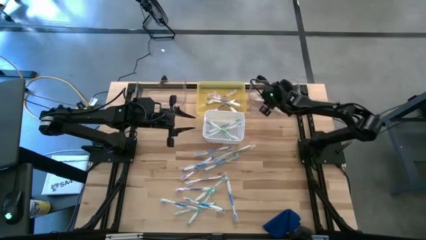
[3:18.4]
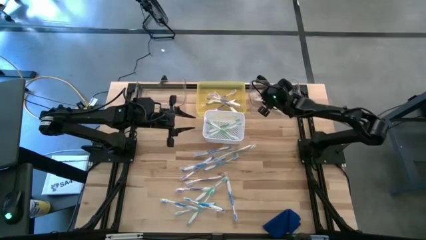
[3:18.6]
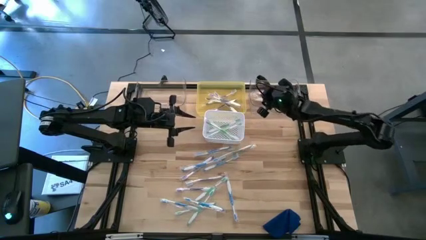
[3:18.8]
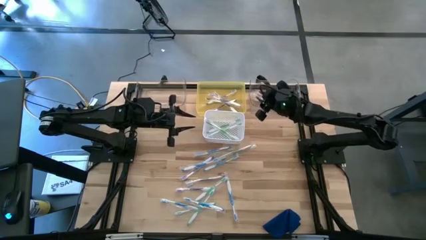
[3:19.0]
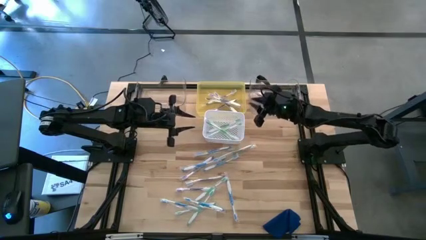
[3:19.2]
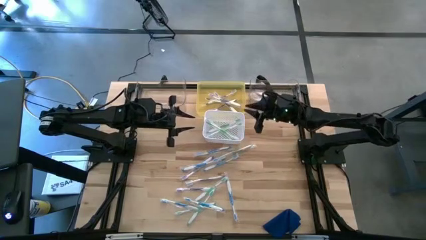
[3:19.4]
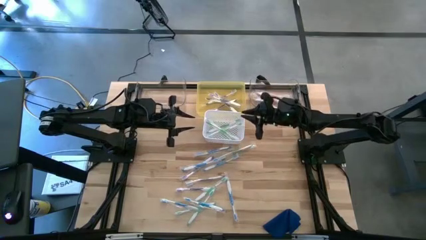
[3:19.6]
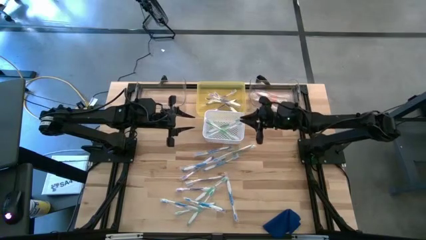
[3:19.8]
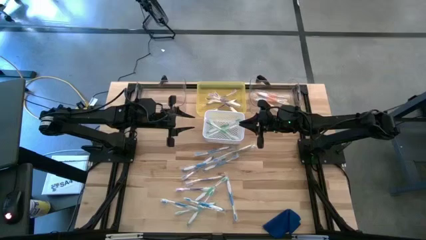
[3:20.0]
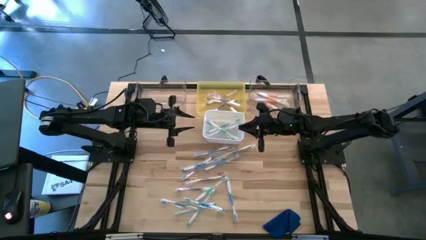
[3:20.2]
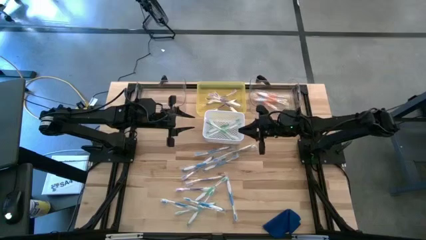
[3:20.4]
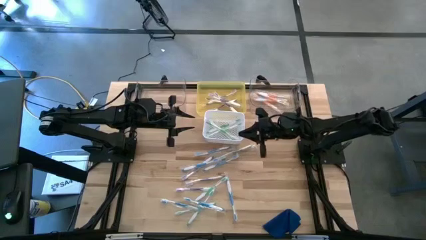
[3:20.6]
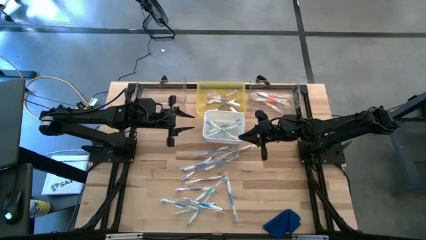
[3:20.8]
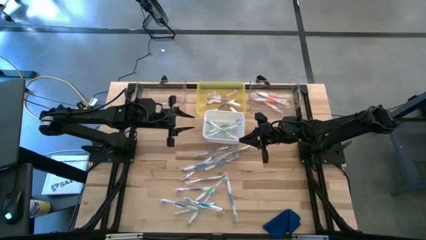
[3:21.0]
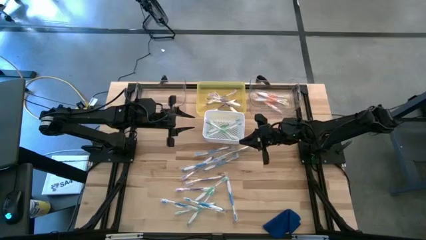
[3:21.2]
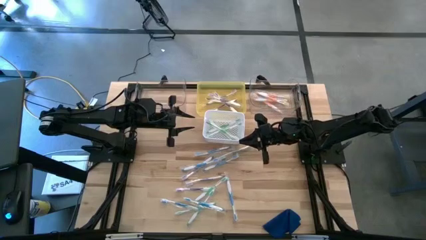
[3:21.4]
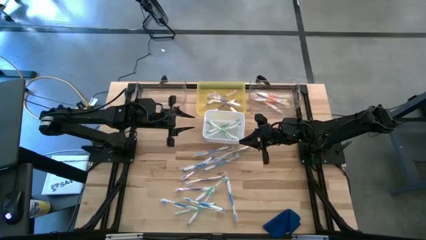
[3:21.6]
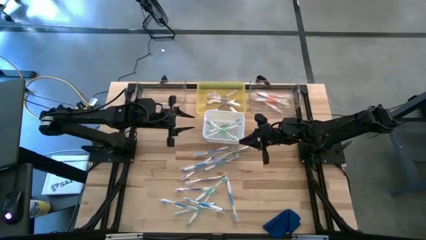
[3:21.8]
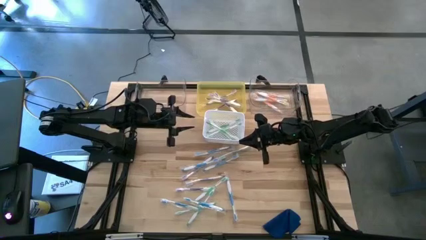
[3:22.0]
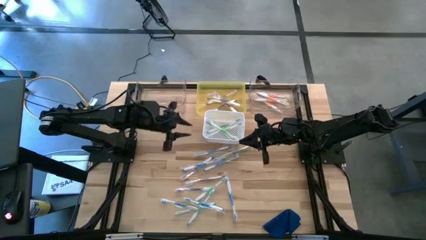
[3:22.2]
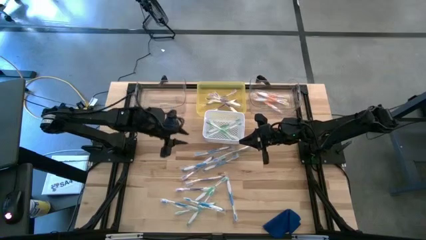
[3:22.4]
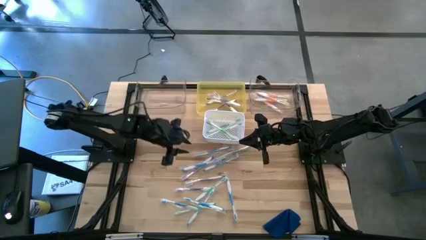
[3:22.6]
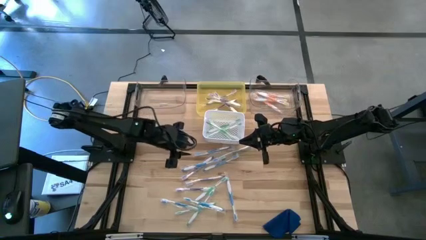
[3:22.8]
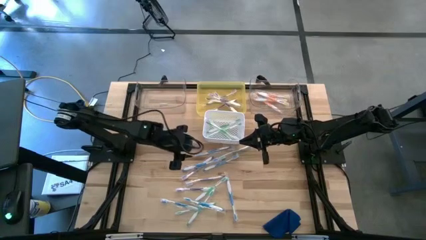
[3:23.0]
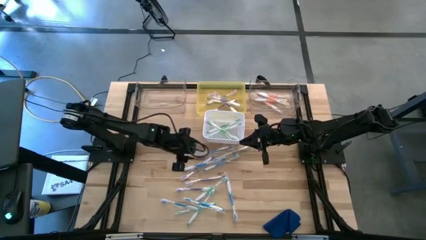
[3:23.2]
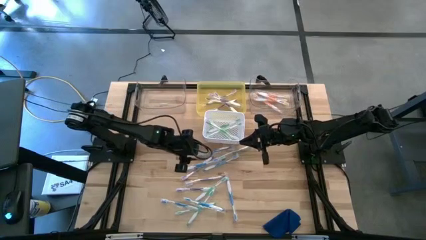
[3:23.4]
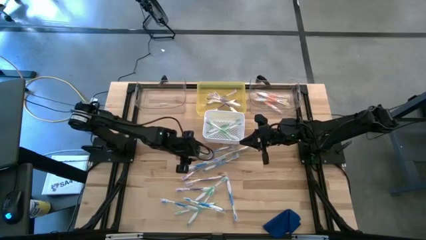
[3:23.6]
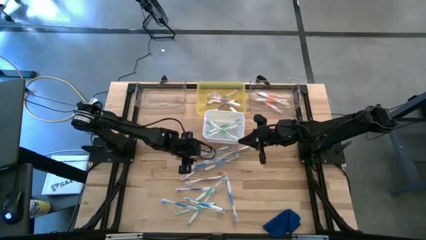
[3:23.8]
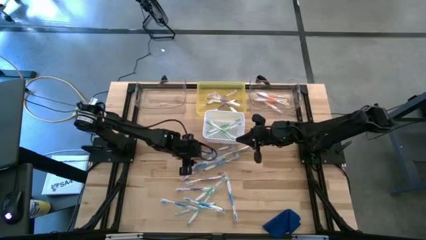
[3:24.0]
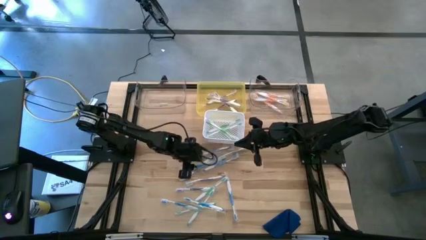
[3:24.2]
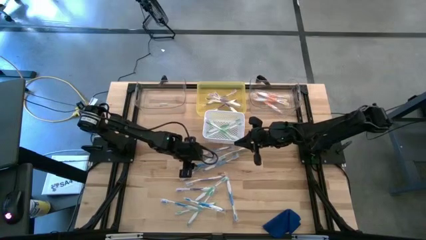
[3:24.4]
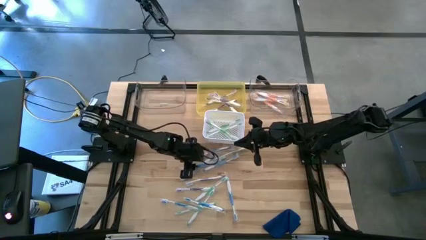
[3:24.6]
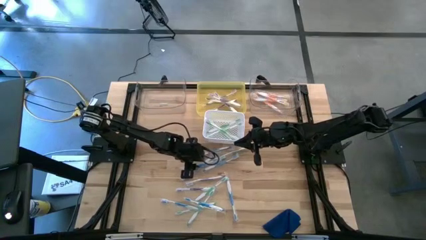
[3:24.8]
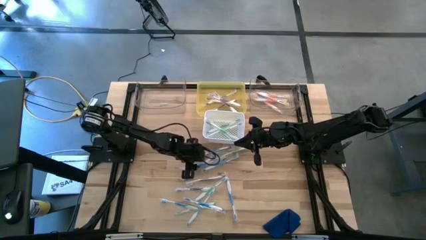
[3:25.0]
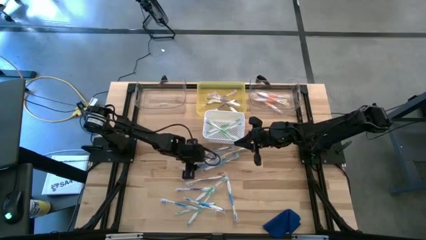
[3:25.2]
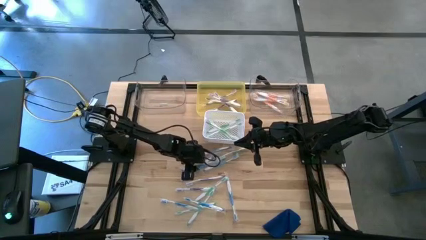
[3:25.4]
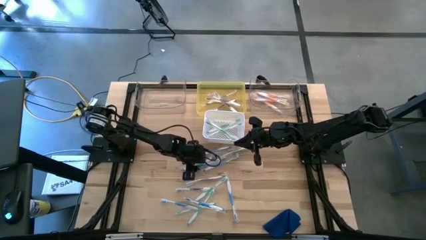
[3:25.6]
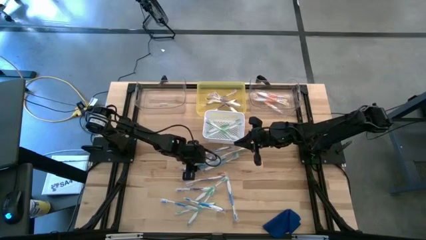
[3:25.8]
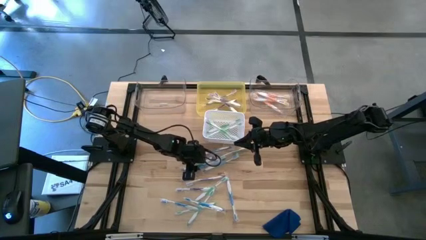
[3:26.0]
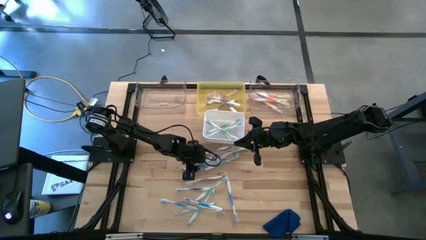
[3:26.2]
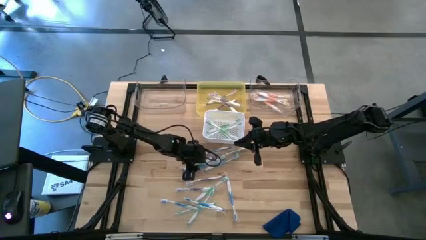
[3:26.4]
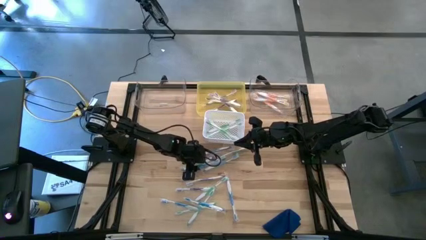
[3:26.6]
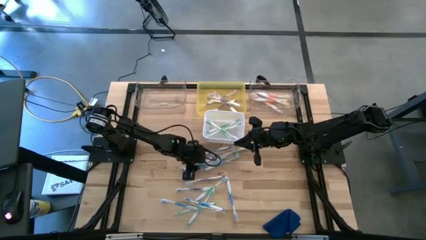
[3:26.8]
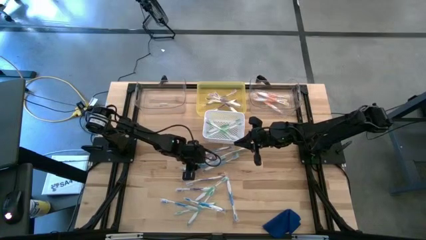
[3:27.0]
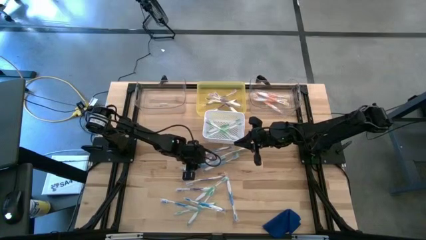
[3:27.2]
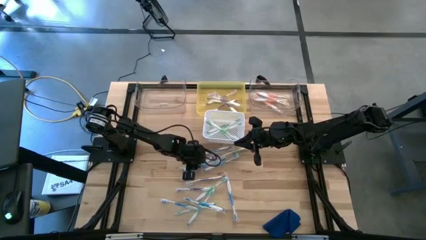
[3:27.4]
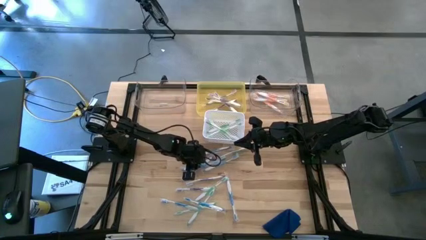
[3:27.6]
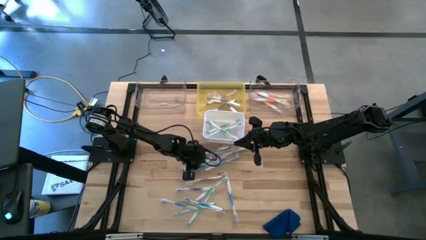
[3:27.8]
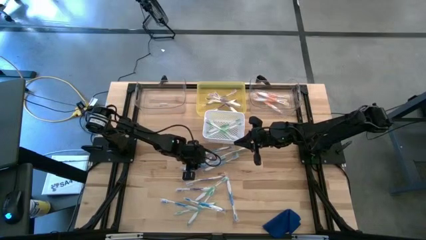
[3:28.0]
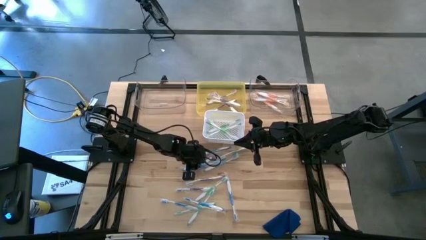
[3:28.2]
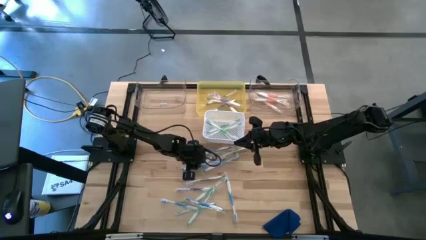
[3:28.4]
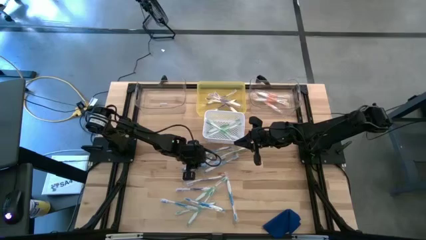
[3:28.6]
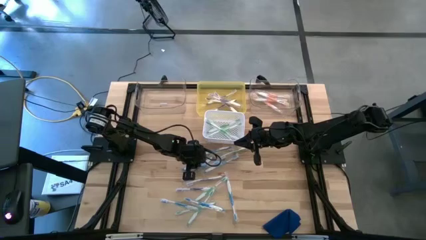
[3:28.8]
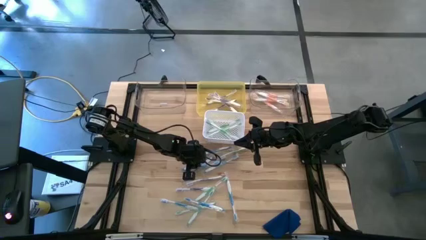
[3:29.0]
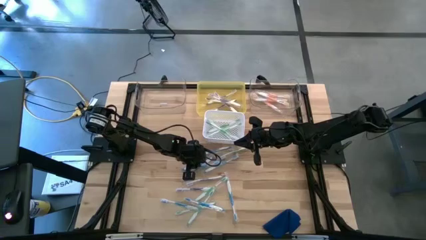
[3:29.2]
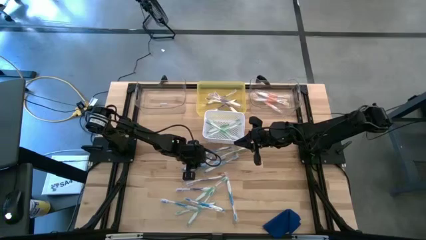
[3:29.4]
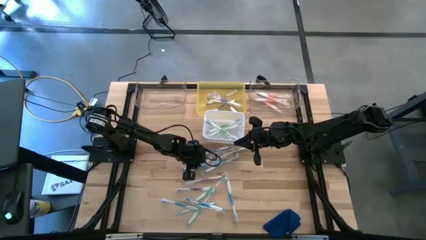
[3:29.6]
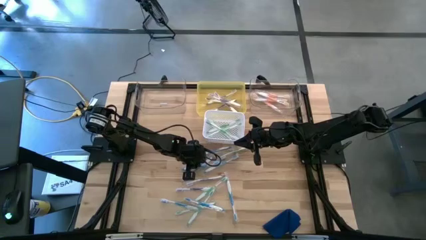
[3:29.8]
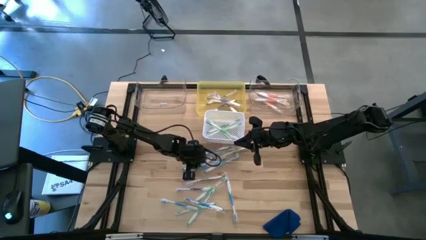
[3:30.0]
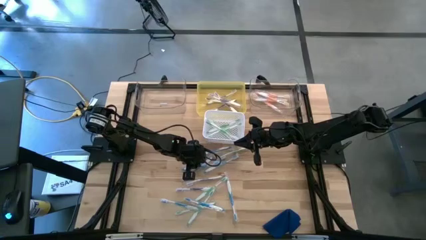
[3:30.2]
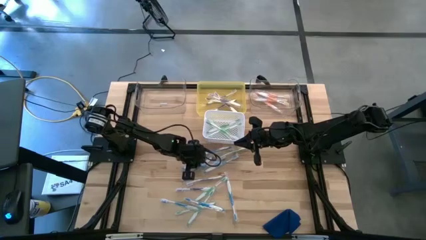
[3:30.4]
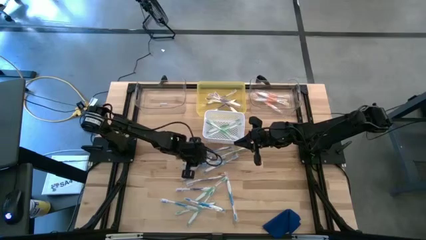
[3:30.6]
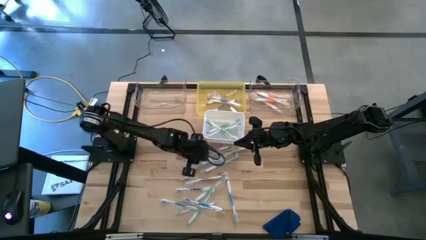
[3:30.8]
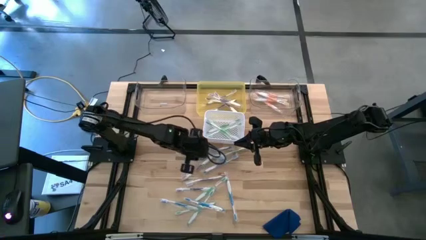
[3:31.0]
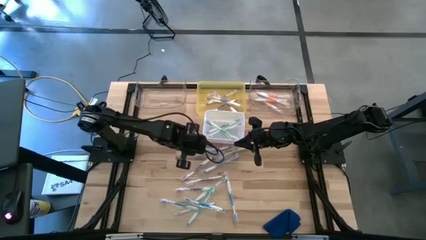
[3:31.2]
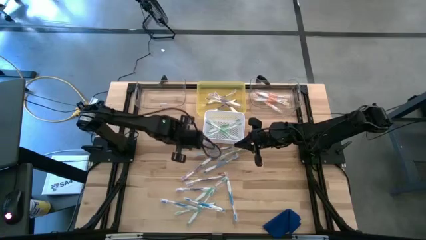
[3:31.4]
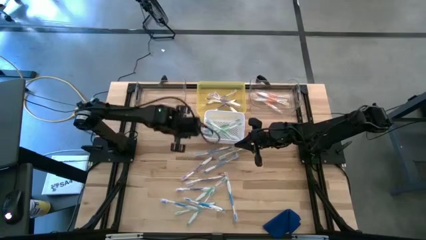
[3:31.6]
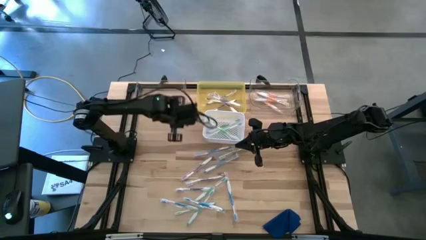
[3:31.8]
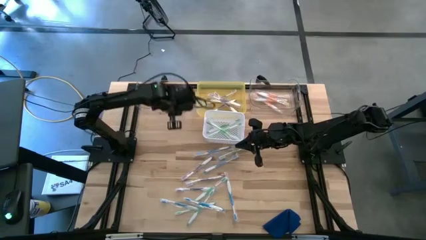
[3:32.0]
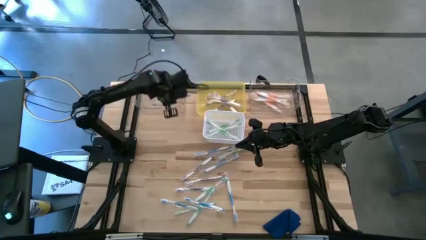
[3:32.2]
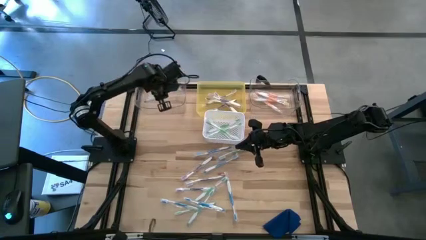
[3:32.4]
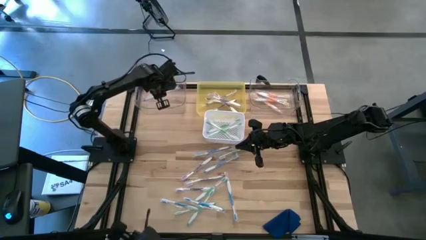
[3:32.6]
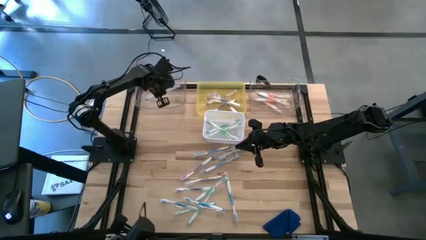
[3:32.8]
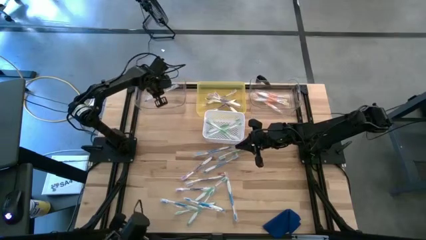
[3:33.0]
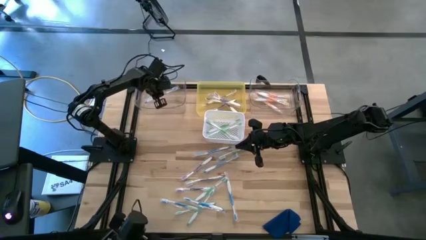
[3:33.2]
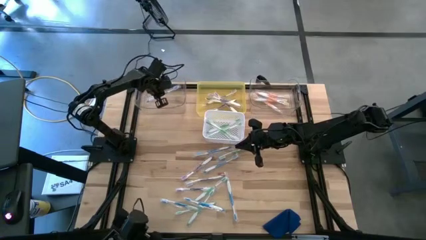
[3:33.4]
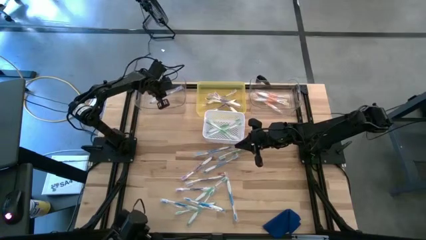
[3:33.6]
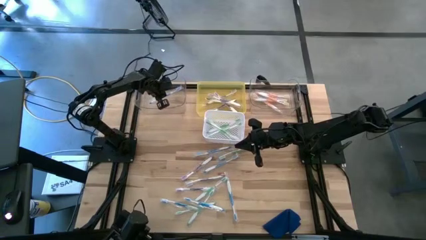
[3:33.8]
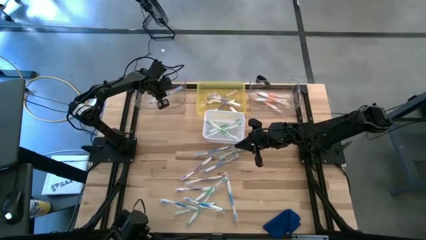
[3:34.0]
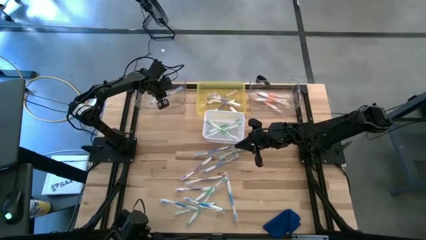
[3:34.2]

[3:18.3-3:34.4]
Task: Pick & Place Toothbrushes
Put the blue toothbrush into the left transparent bin
